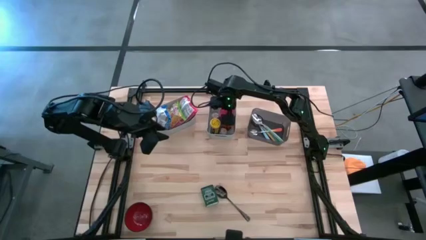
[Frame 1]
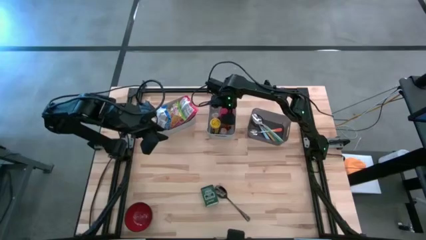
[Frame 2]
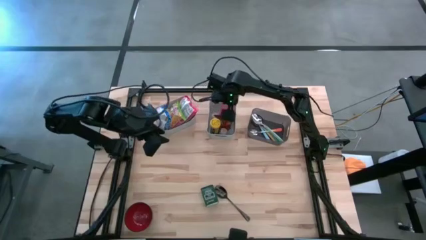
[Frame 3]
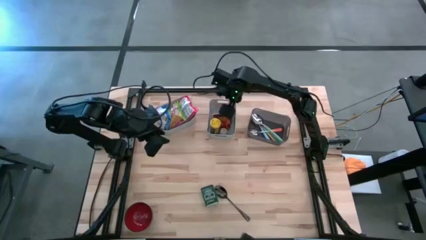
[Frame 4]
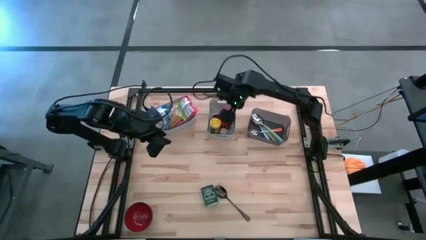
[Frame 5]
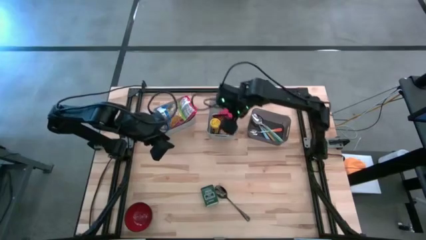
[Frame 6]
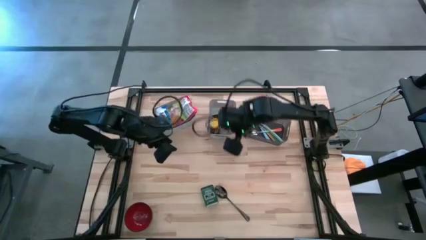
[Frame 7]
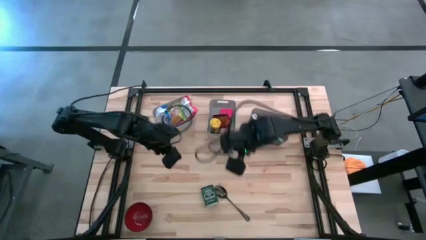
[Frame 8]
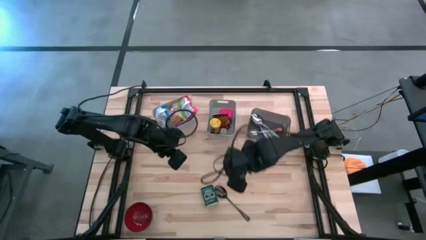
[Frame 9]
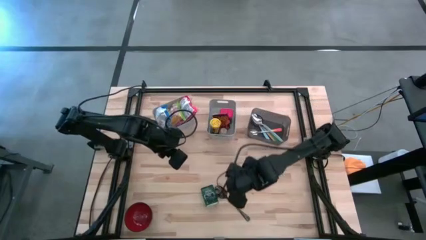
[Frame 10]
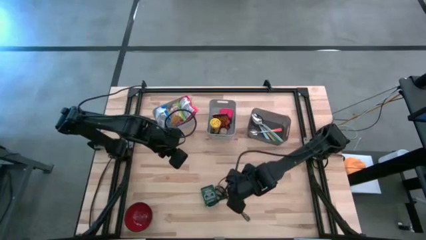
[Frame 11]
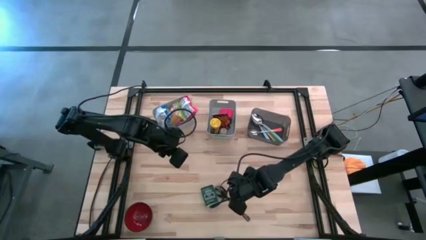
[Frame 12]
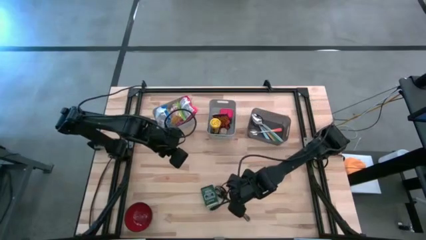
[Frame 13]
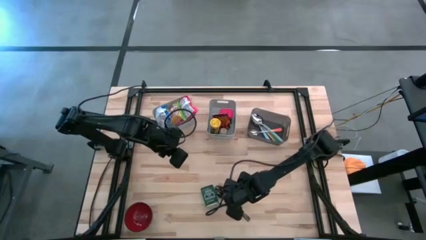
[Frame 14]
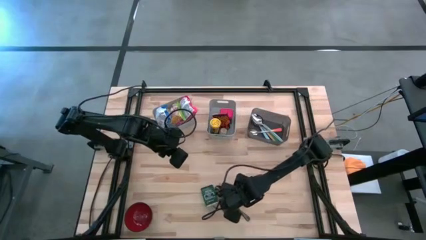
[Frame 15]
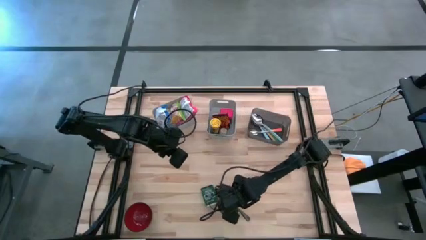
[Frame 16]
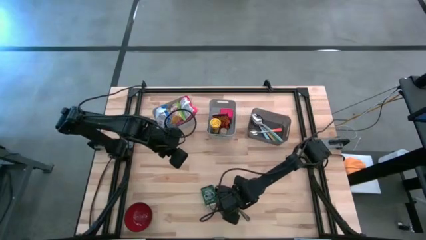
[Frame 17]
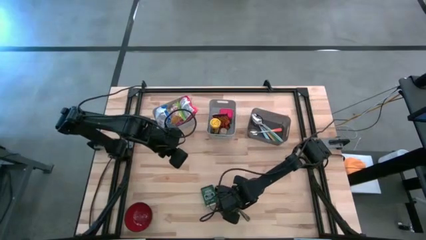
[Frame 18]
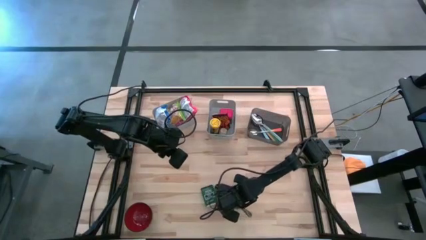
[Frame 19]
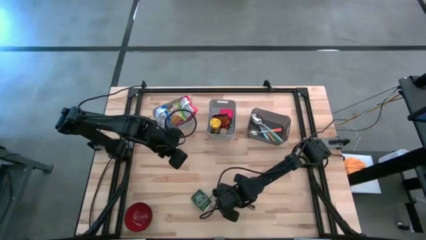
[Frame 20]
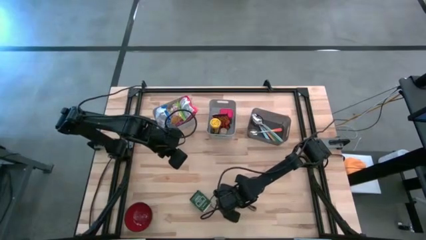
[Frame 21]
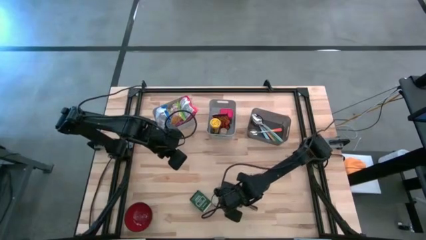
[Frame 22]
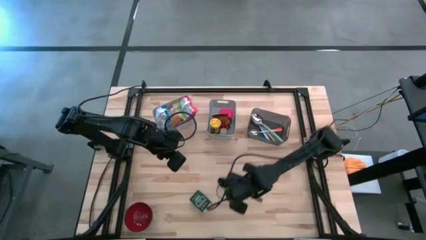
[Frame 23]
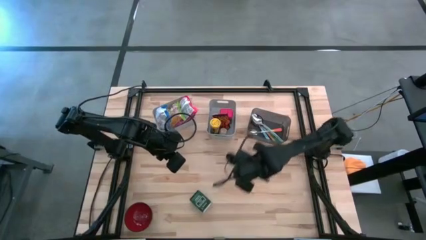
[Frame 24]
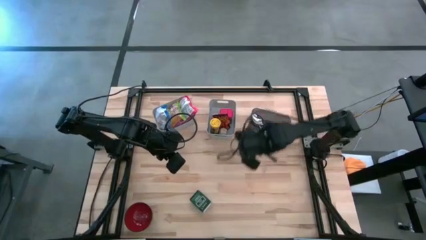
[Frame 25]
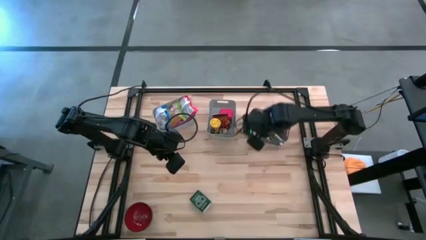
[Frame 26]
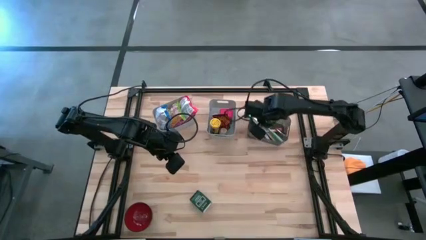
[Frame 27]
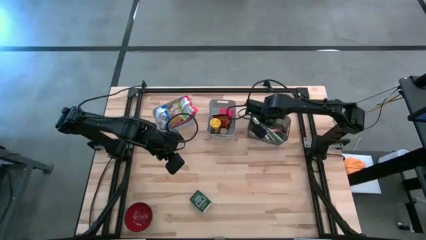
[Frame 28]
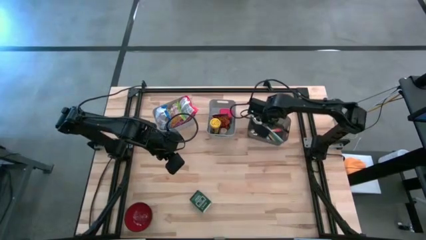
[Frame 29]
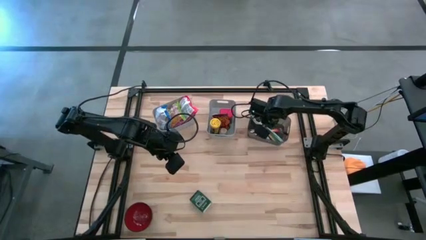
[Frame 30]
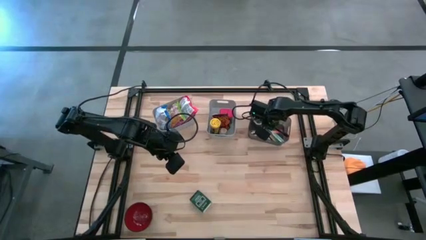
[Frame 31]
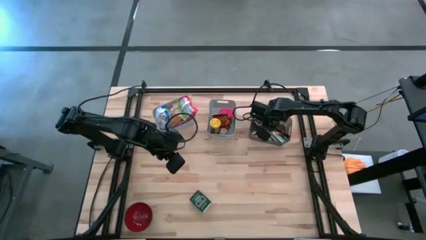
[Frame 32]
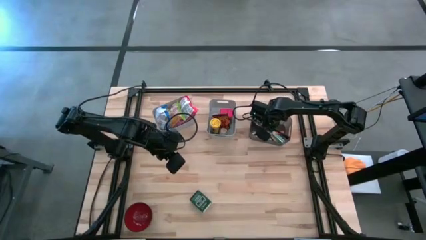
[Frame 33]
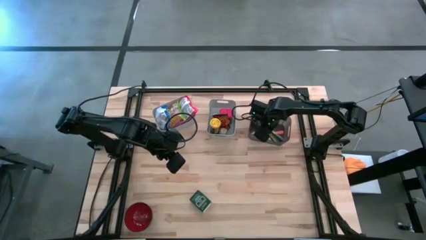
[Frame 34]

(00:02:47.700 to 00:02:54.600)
Put the black spoon into the black bin
